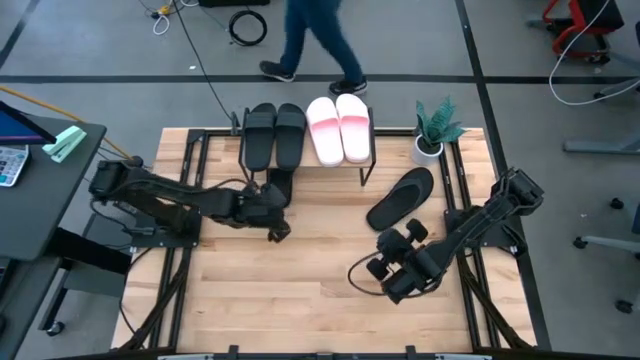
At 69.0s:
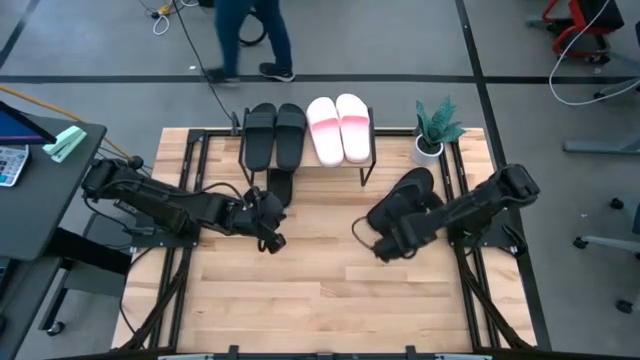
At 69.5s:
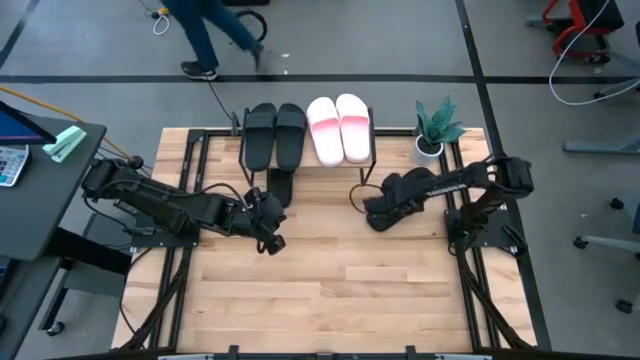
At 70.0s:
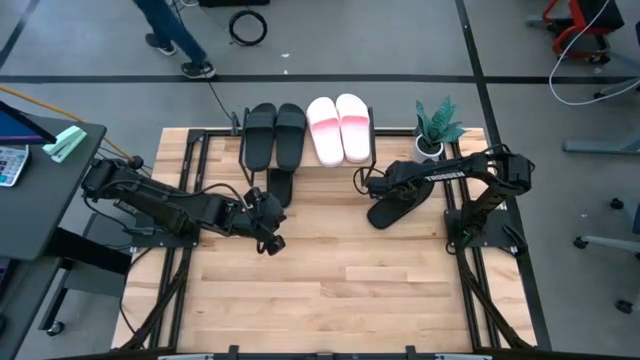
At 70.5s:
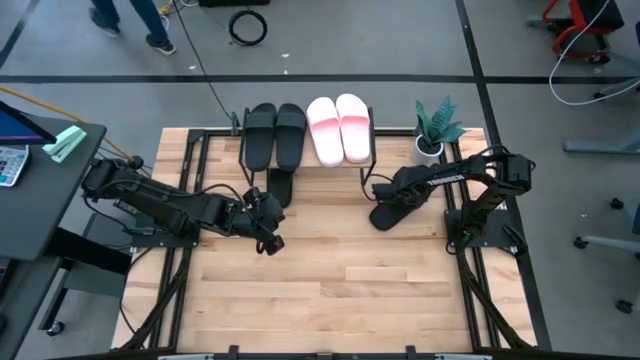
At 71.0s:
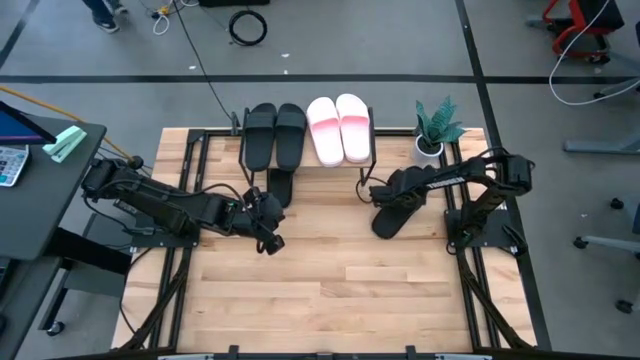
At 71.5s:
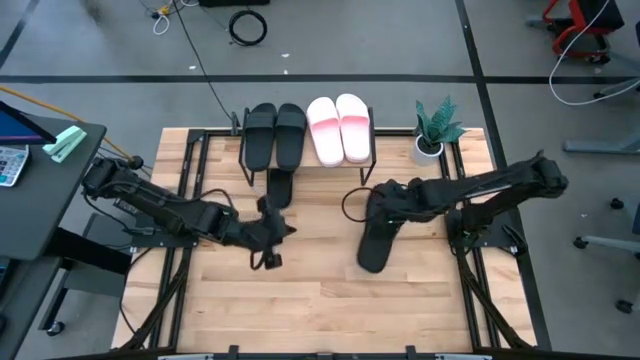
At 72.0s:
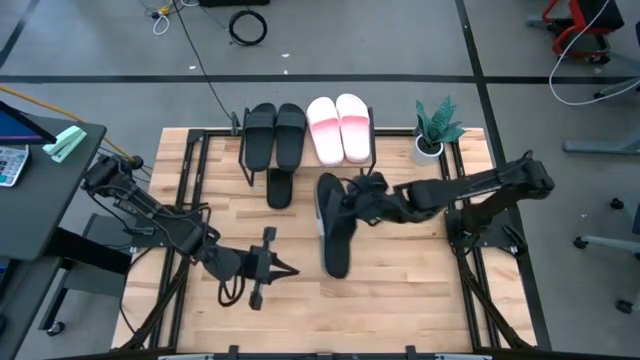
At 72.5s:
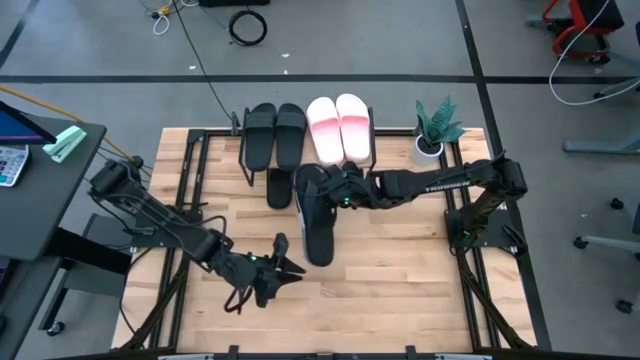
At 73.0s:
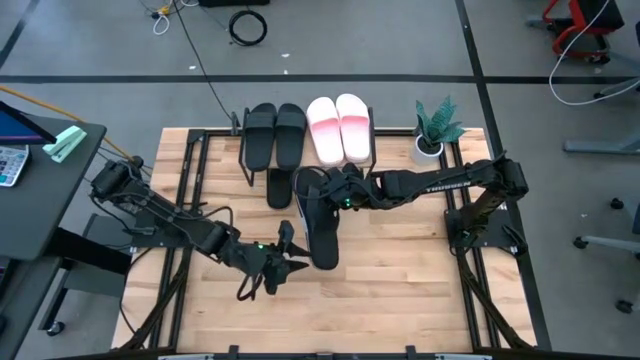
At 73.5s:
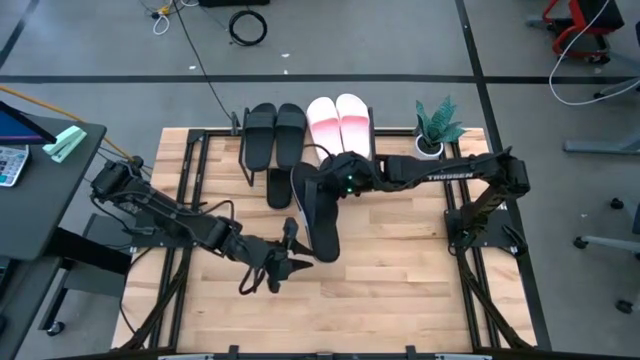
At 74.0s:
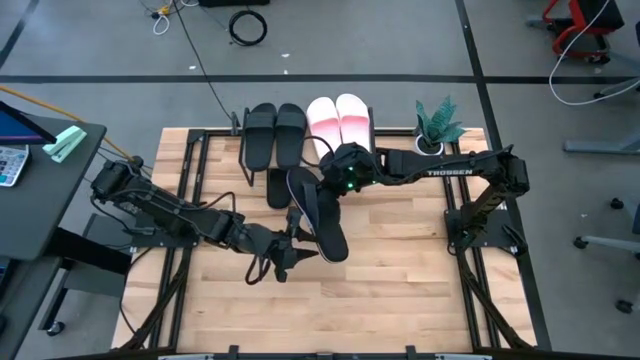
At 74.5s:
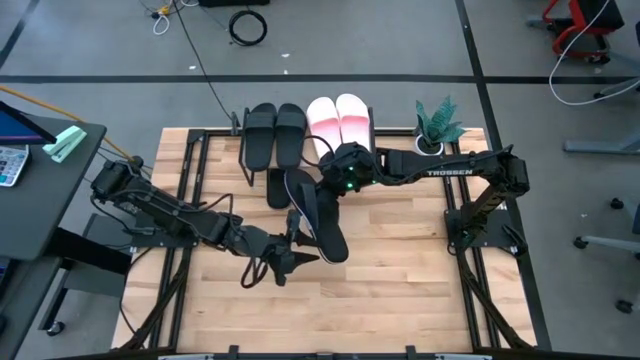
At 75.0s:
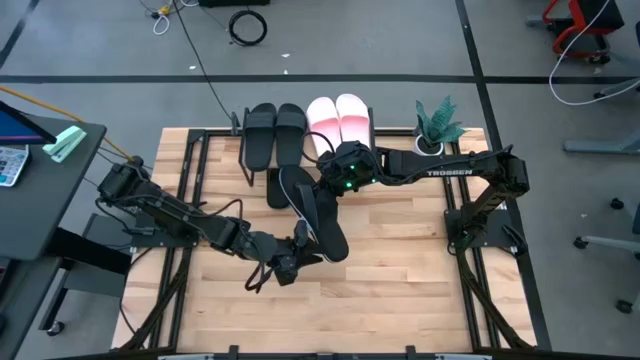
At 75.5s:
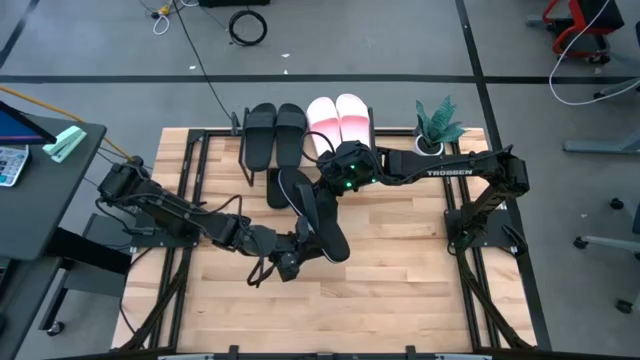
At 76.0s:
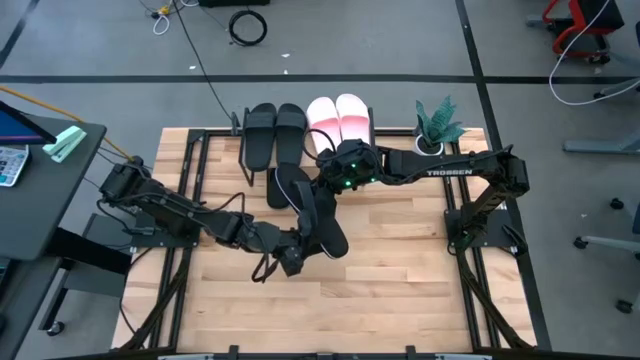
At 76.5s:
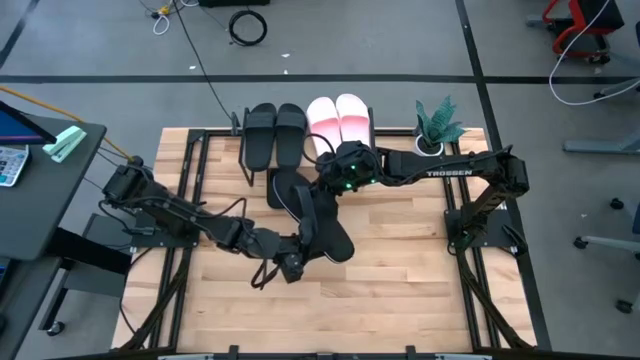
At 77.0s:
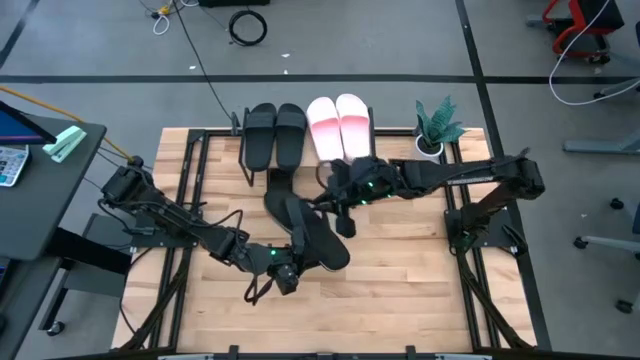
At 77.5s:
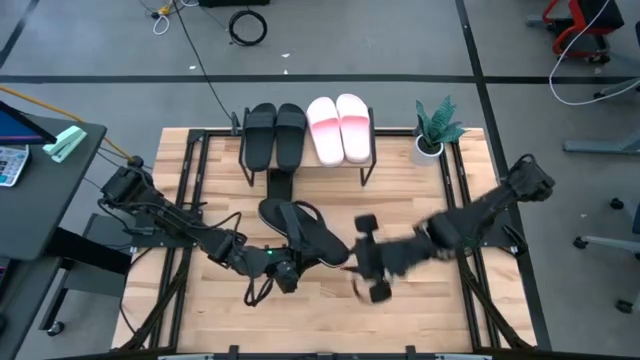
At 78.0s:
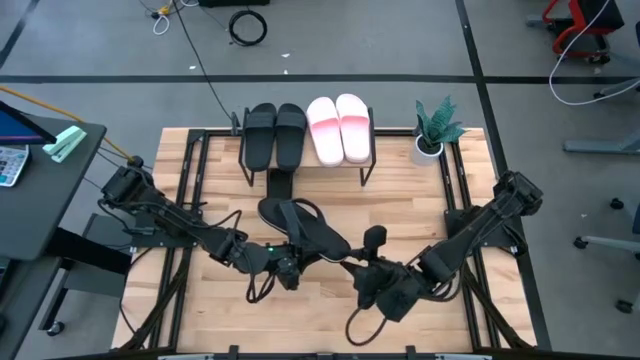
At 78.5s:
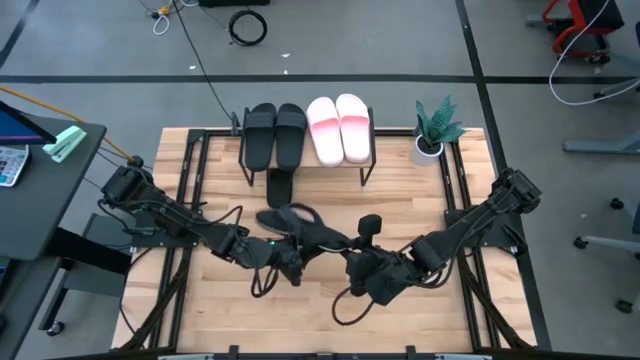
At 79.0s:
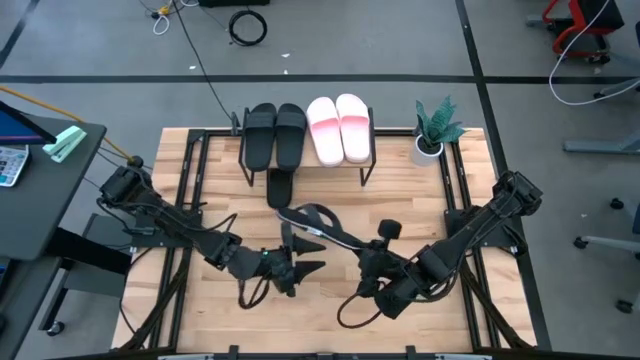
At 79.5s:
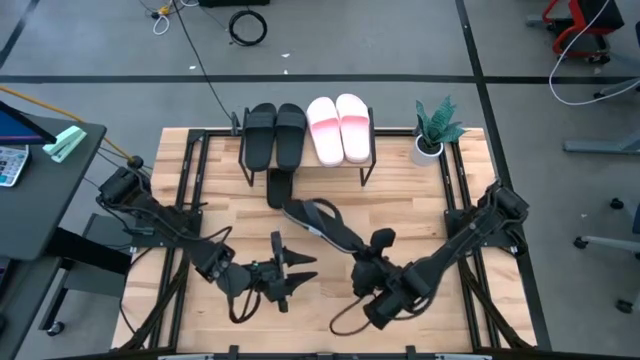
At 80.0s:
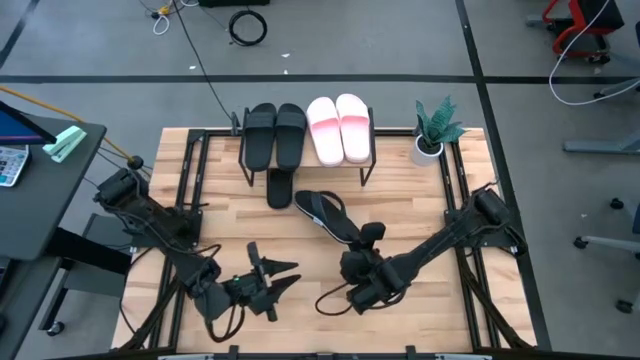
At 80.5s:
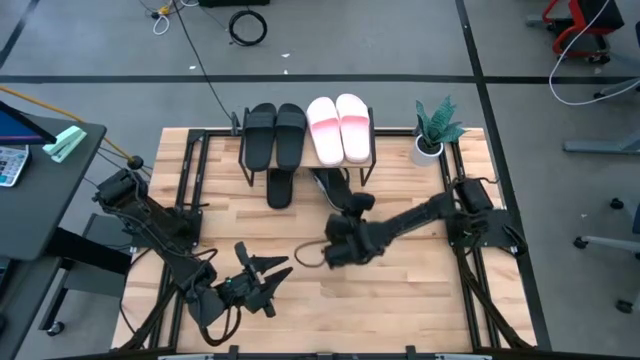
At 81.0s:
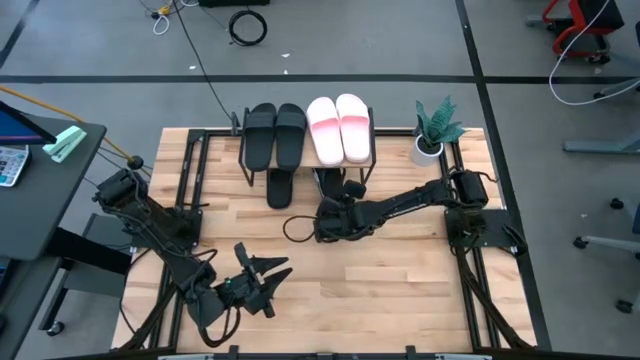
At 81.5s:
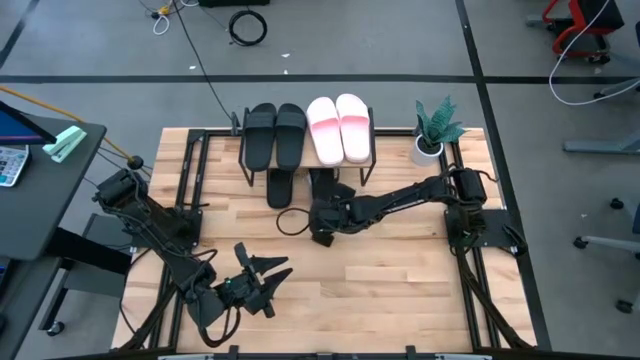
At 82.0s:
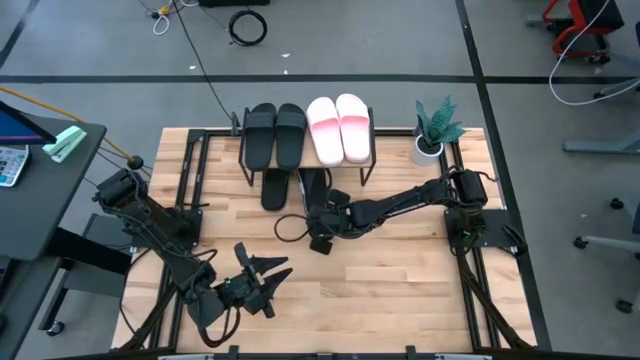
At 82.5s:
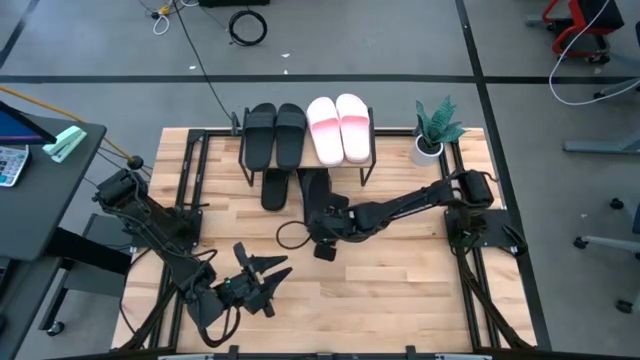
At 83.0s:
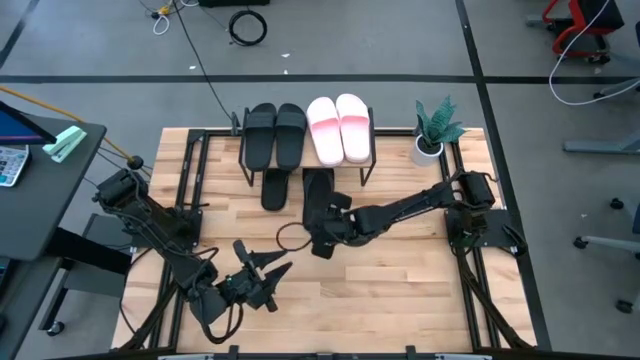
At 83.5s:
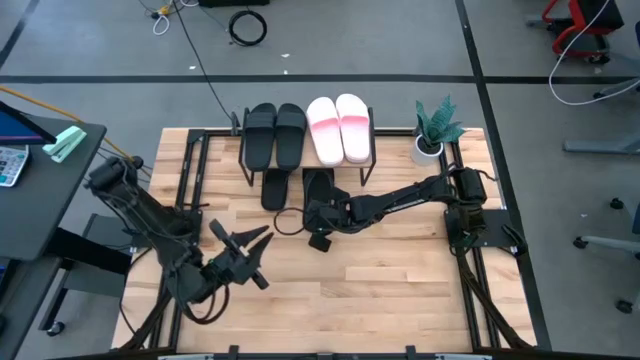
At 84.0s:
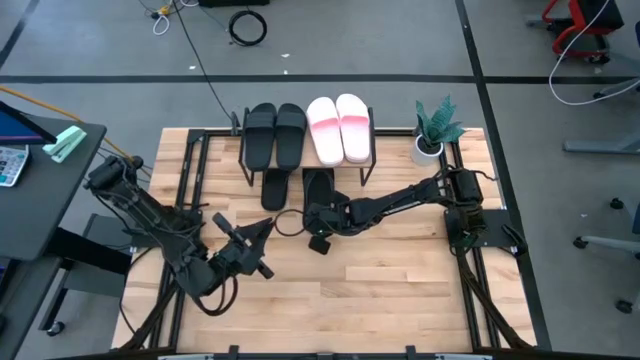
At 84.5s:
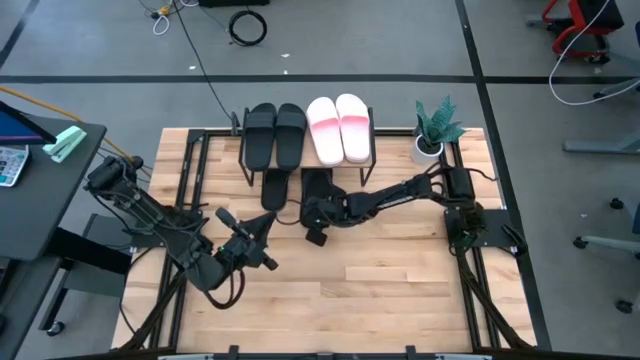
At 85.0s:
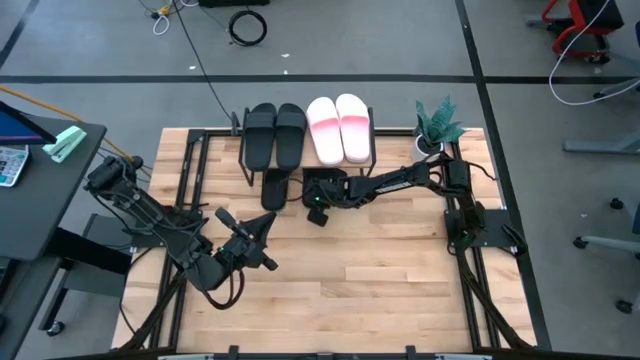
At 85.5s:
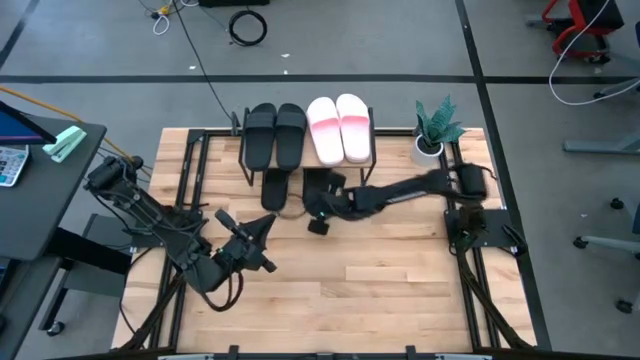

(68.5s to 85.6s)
Task: Pick and place slides into the shelf
Move the black flip flop under the table
